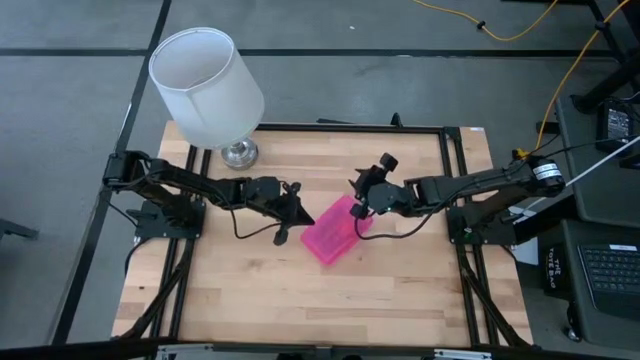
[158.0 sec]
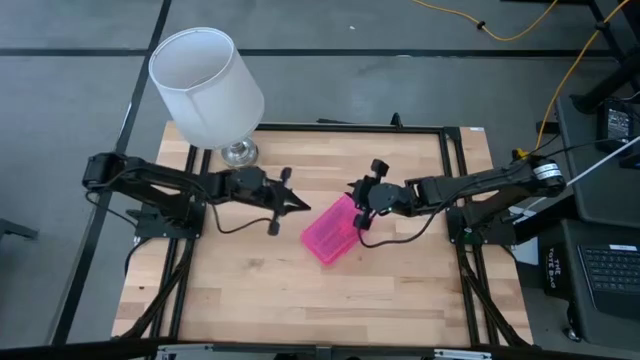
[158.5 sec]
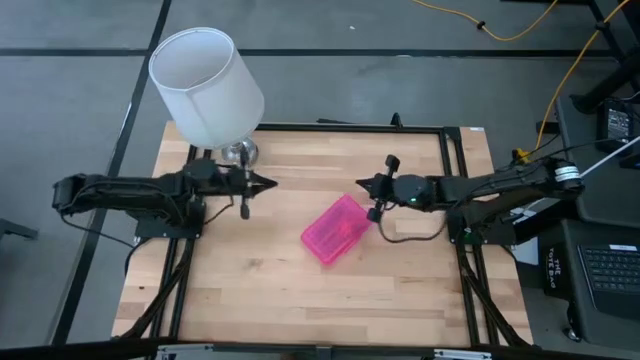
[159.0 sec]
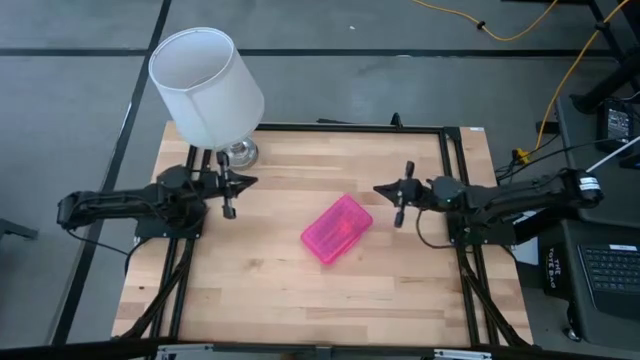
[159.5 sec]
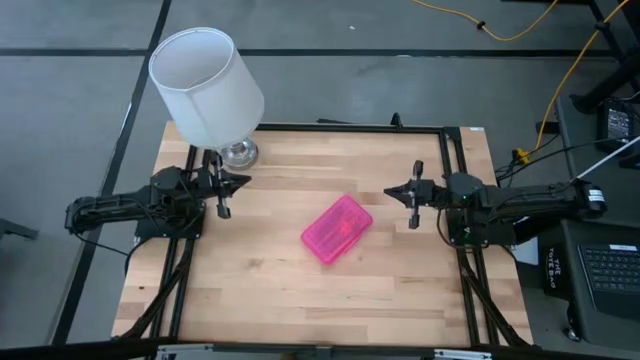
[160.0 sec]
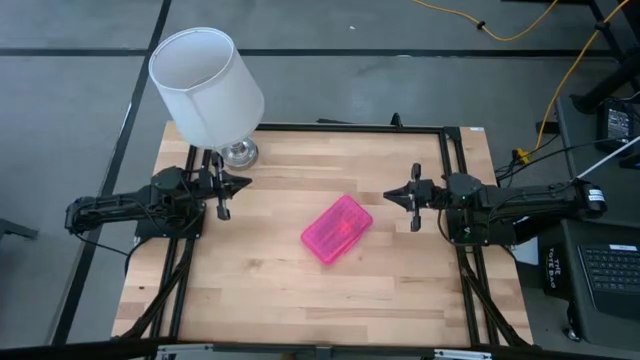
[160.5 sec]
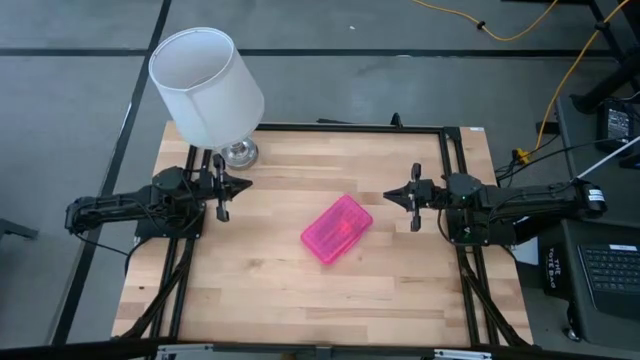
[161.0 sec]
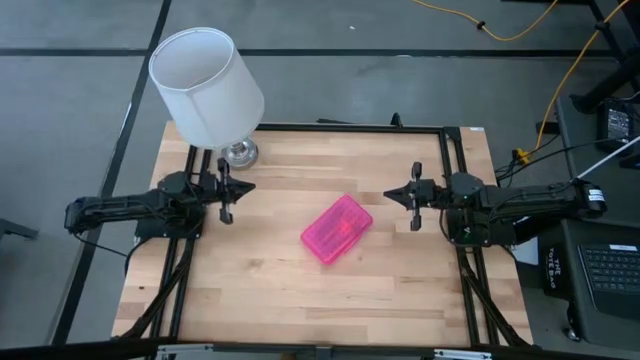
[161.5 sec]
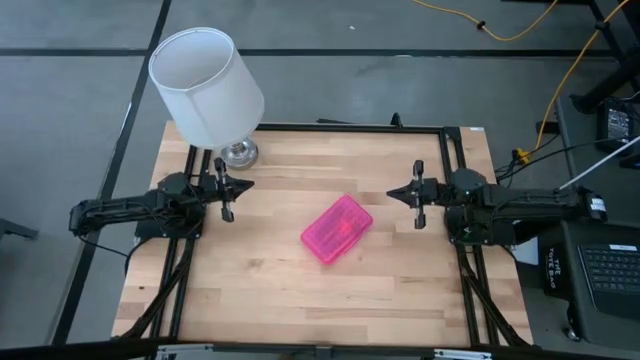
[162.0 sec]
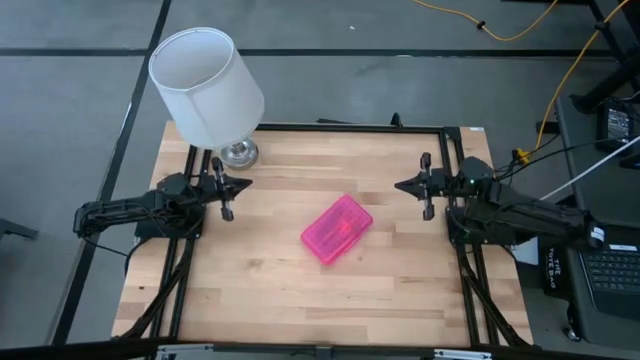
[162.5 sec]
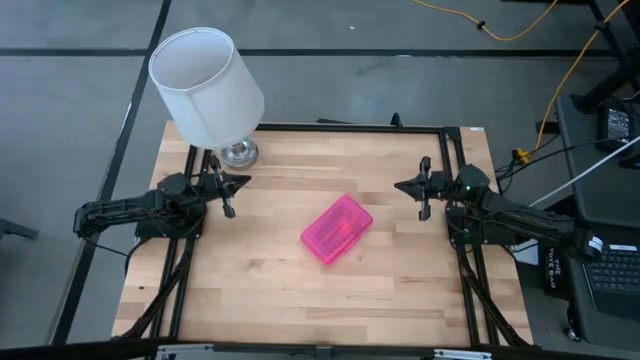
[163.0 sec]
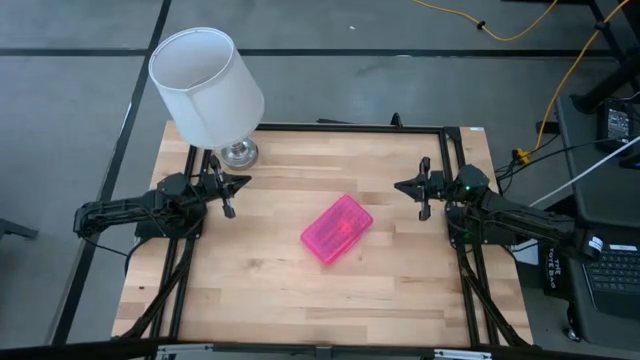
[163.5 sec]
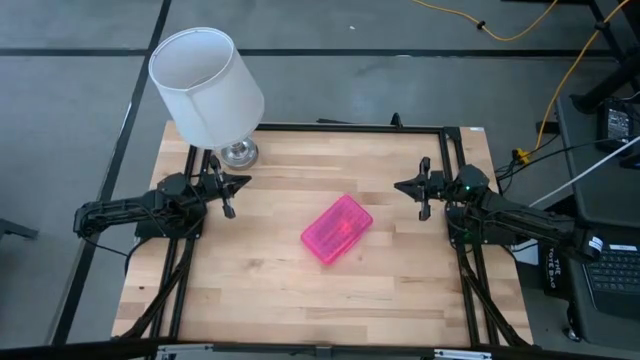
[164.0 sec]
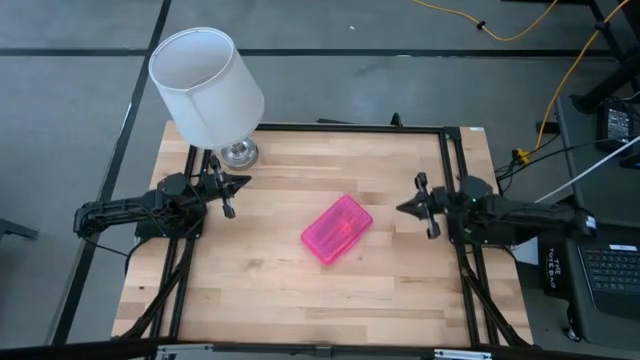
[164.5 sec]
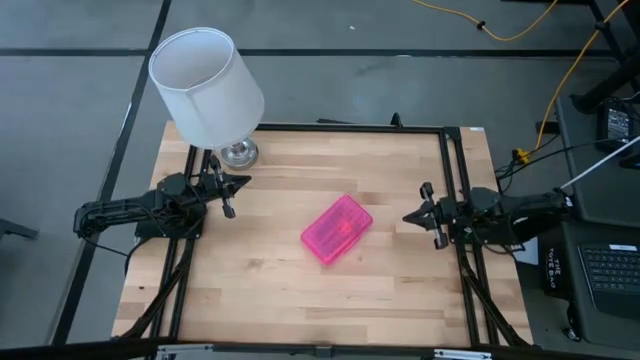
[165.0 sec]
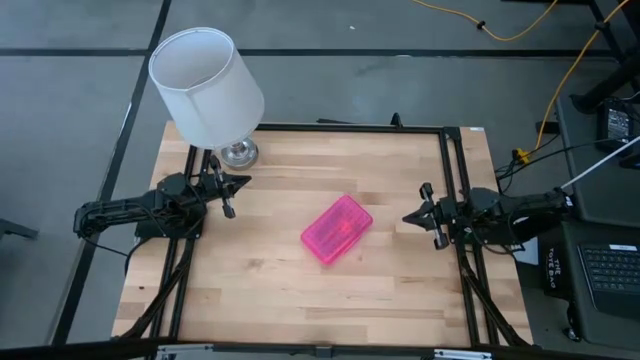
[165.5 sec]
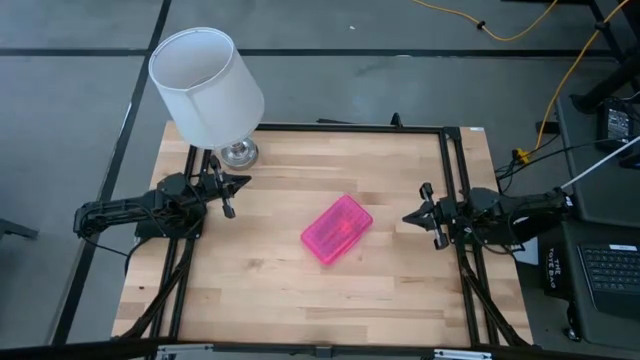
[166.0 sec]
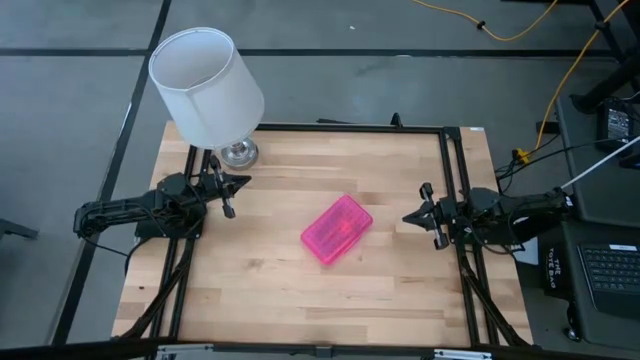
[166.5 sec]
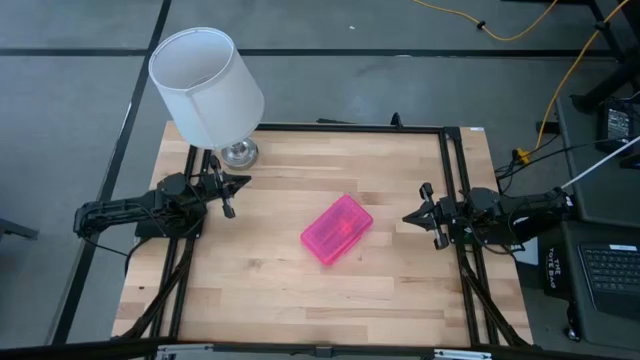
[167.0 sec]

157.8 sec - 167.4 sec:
Task: Pick & place school supplies into a supply box
Return to Home Position

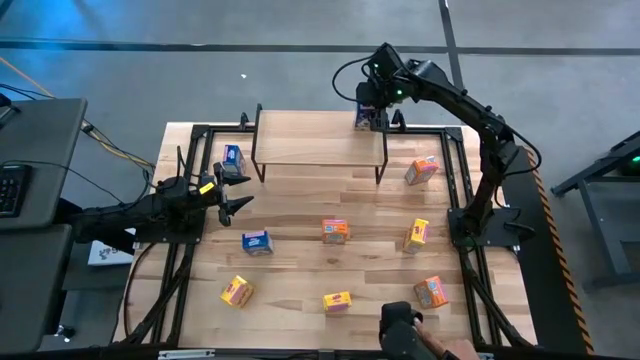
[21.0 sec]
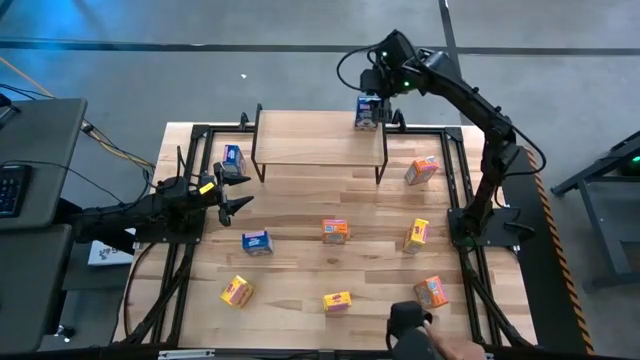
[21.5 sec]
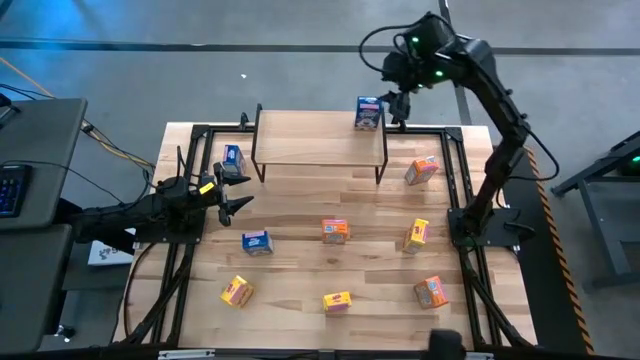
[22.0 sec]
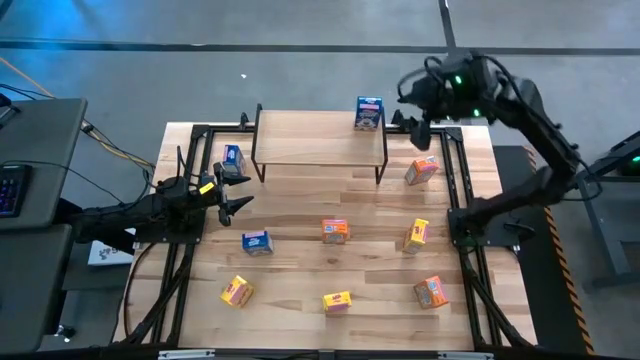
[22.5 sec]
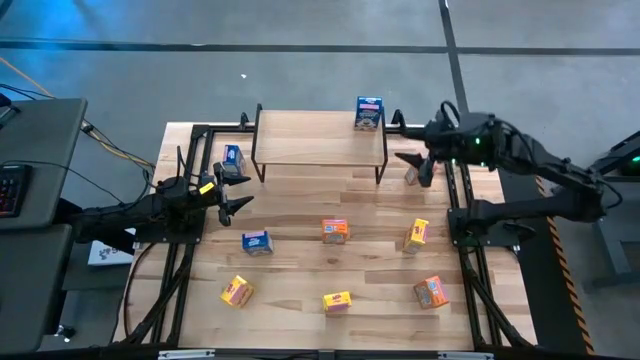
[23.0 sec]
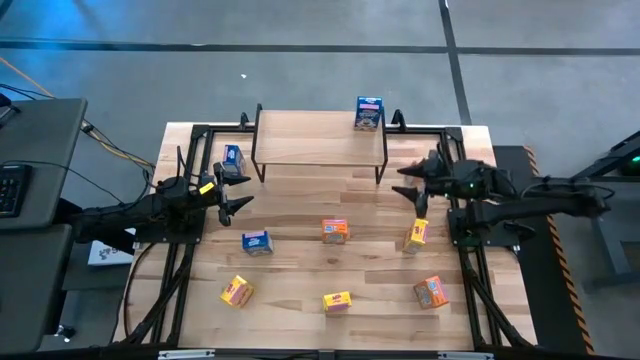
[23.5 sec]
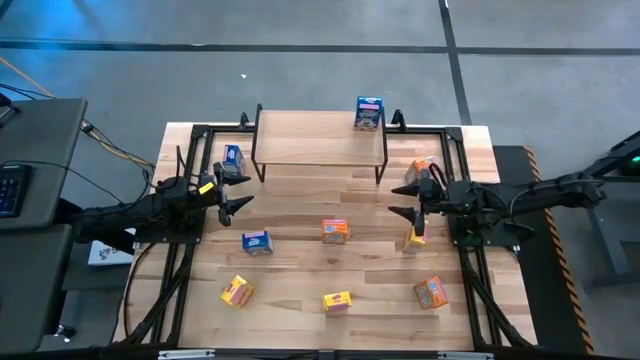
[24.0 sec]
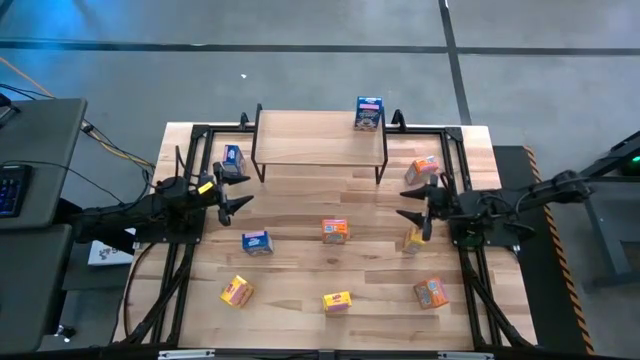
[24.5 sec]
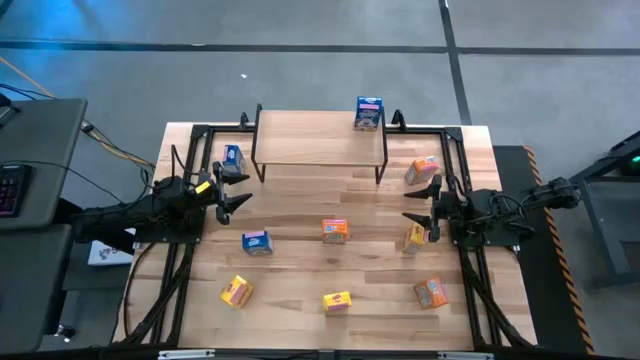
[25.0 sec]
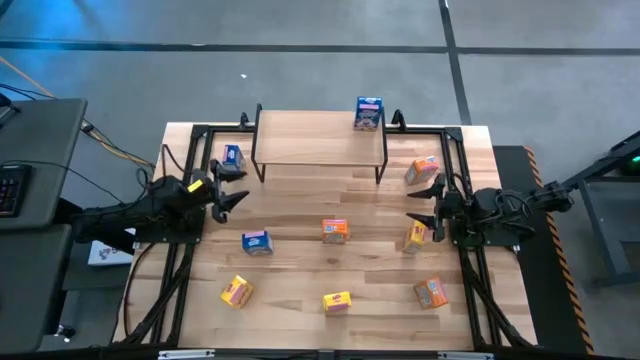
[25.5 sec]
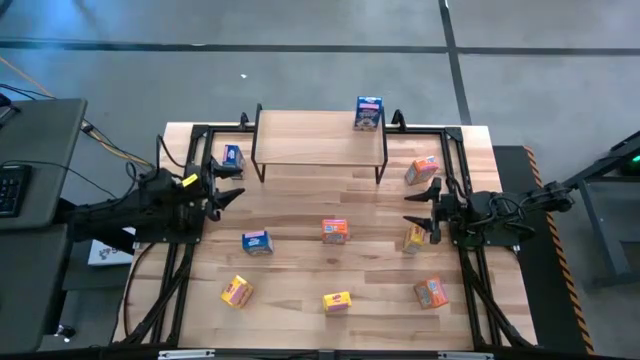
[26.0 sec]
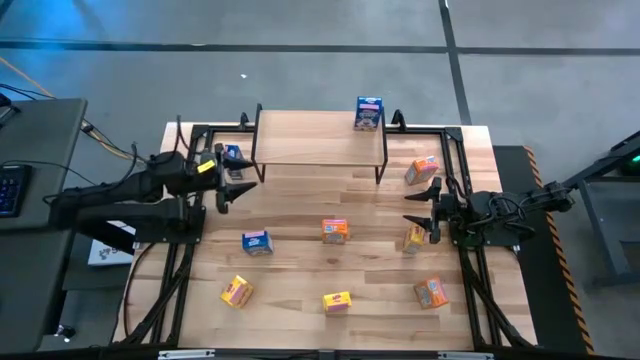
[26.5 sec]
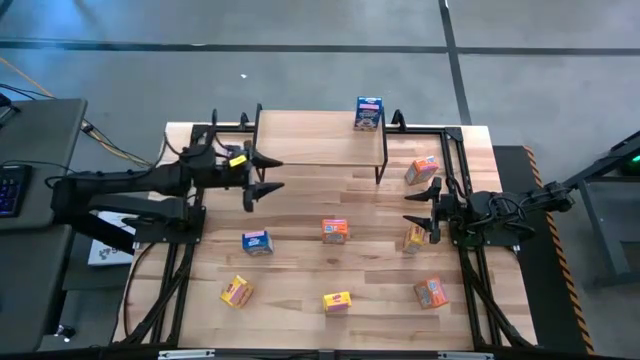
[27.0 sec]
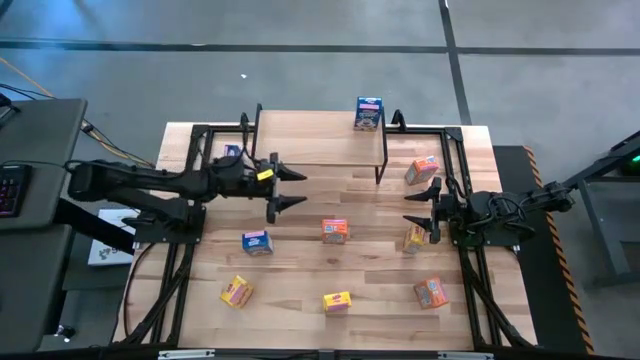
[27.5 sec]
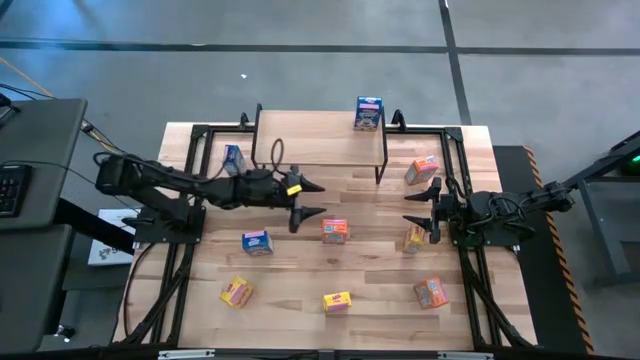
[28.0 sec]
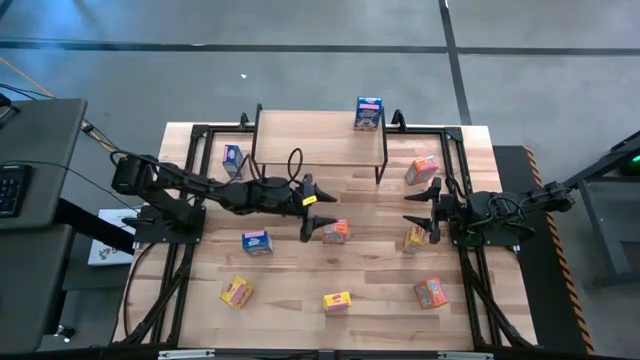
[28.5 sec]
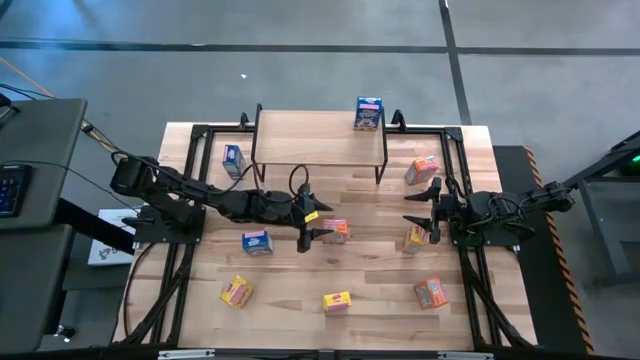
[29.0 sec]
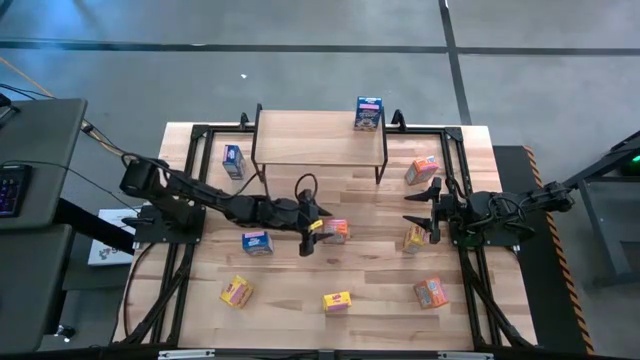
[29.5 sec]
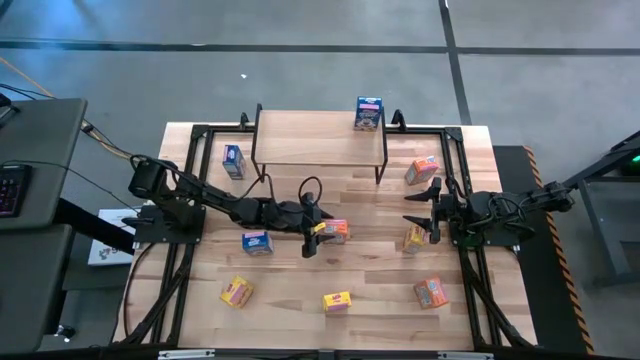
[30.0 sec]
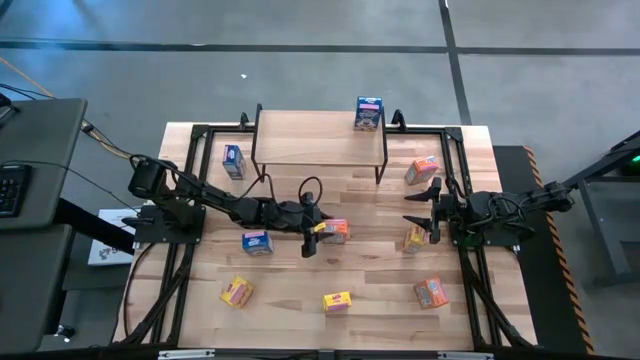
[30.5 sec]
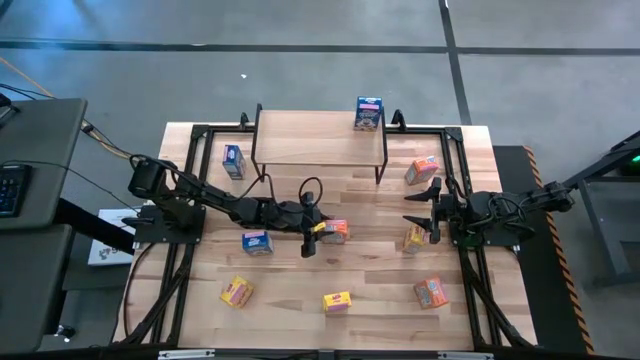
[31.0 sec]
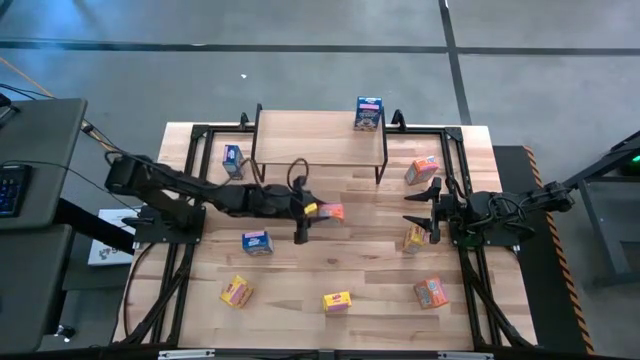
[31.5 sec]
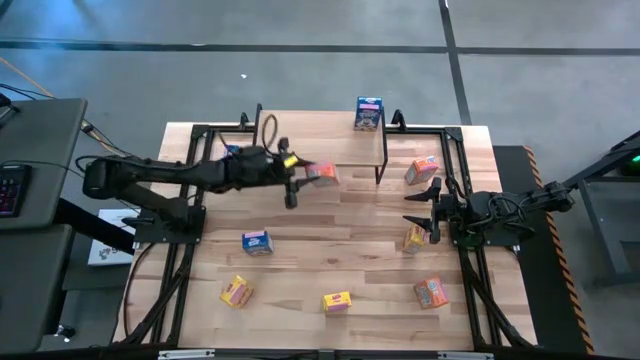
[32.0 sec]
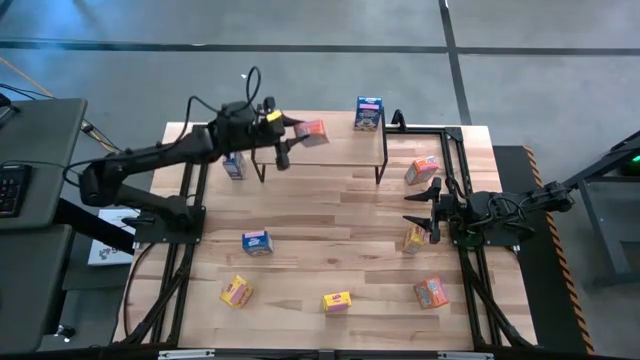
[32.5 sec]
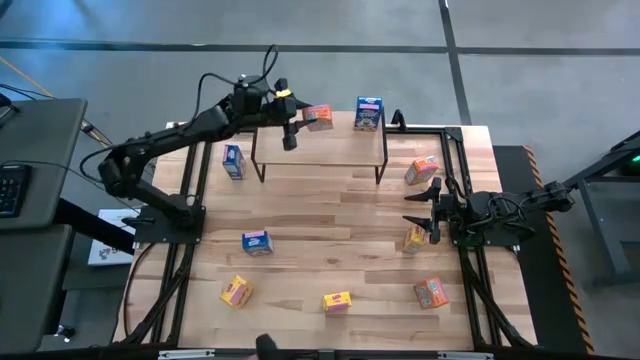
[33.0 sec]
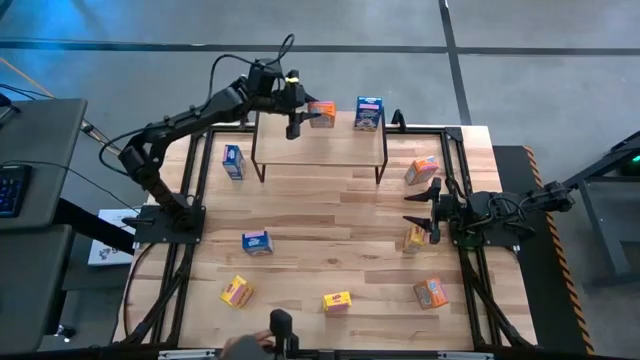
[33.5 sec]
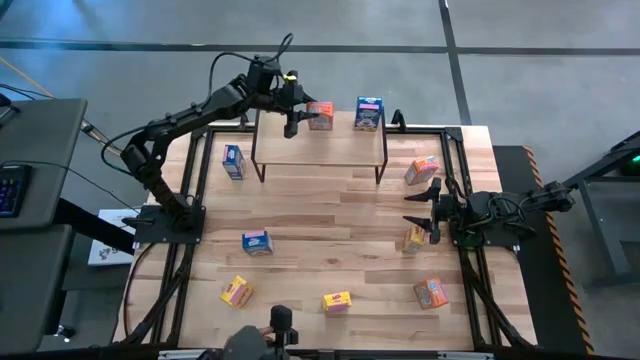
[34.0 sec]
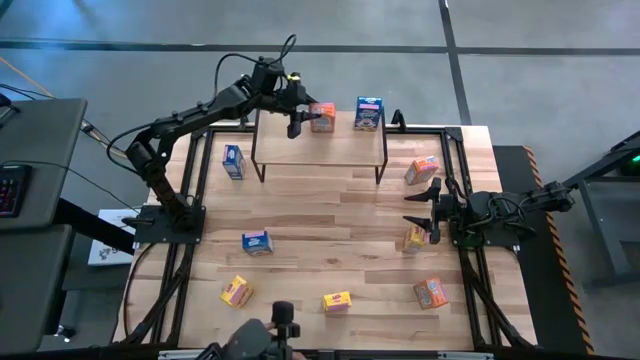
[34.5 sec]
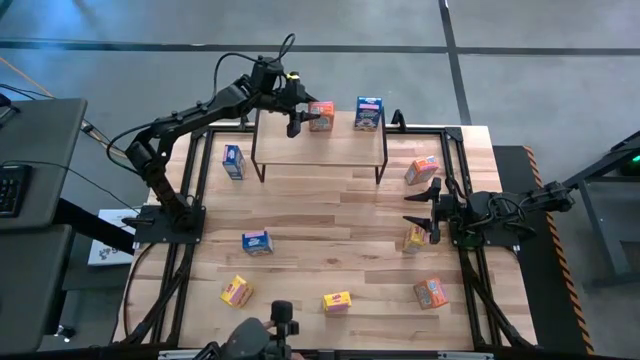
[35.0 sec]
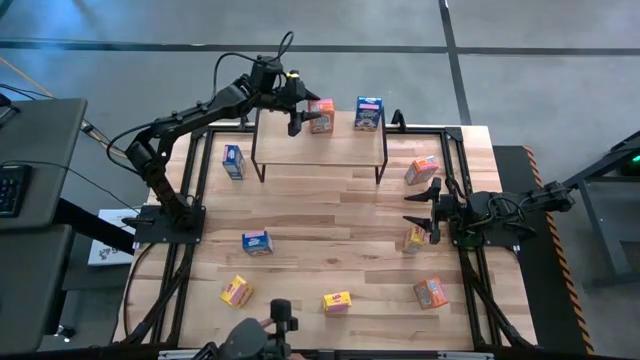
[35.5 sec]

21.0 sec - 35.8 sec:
Task: Stack cereal on shelf
Put the middle orange cereal box on the shelf
